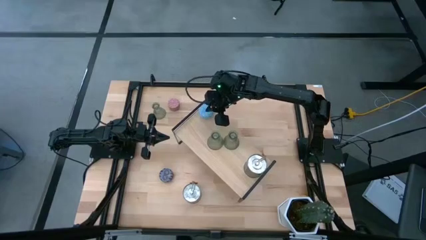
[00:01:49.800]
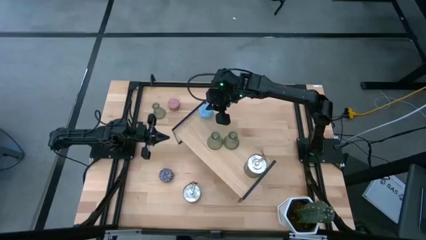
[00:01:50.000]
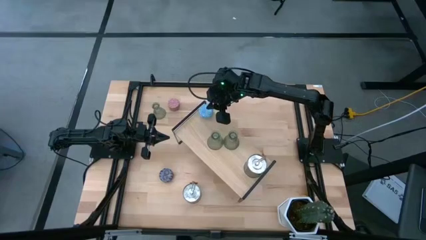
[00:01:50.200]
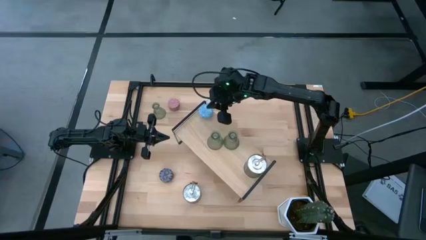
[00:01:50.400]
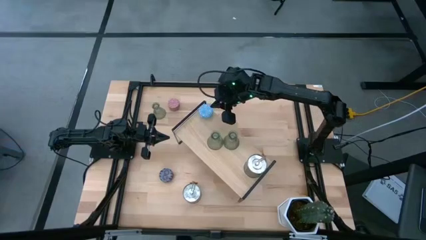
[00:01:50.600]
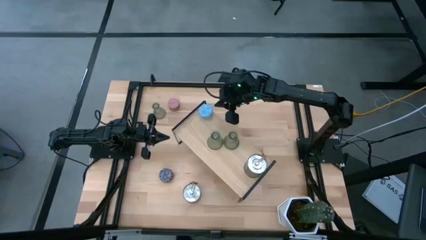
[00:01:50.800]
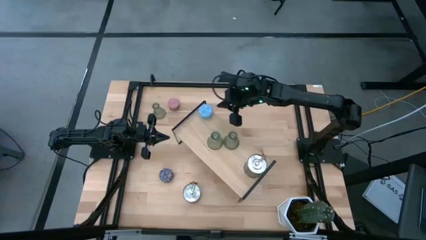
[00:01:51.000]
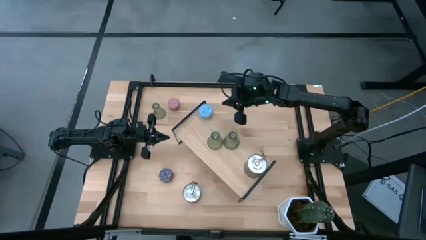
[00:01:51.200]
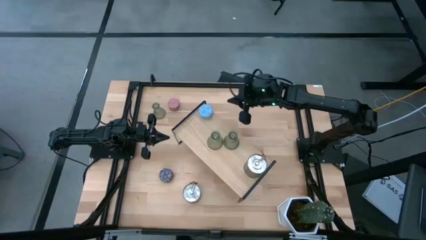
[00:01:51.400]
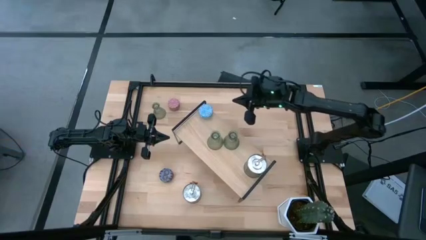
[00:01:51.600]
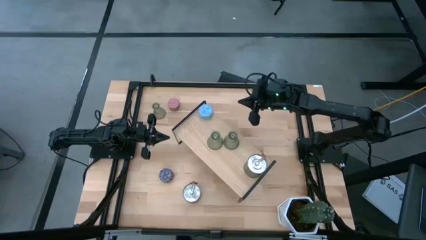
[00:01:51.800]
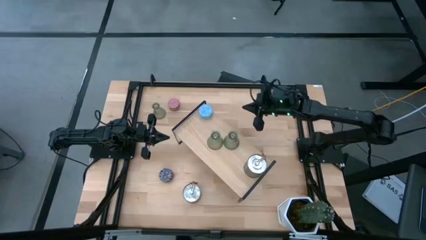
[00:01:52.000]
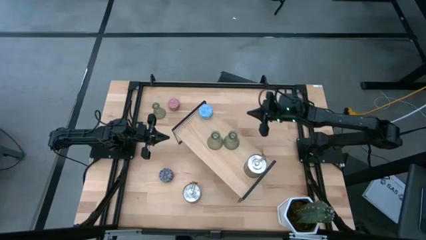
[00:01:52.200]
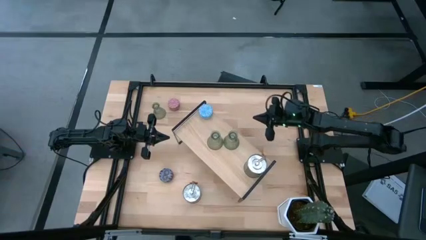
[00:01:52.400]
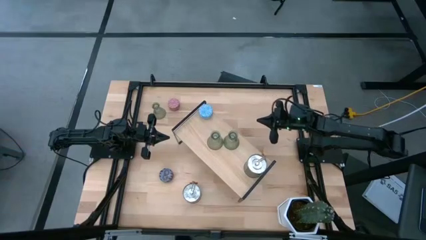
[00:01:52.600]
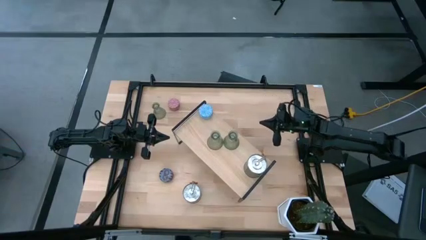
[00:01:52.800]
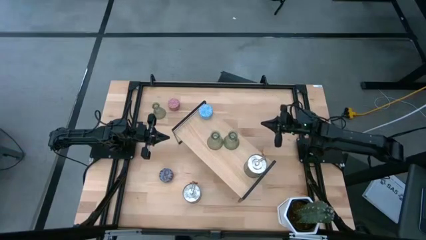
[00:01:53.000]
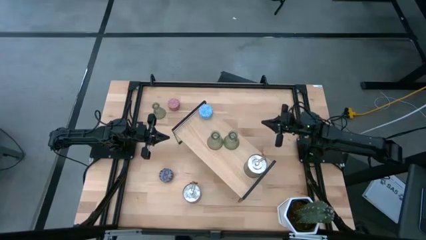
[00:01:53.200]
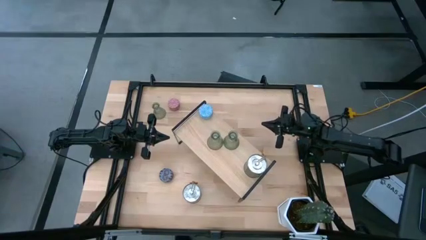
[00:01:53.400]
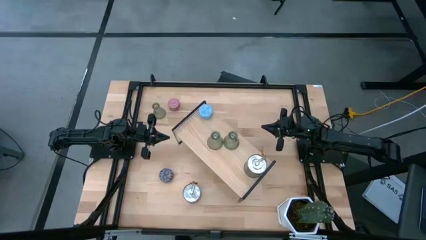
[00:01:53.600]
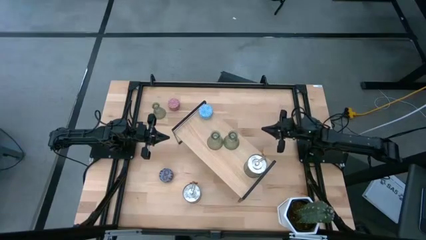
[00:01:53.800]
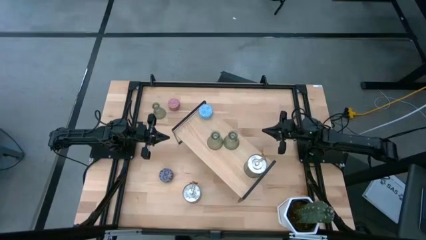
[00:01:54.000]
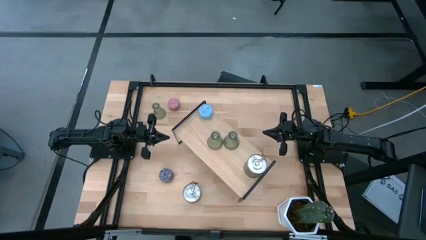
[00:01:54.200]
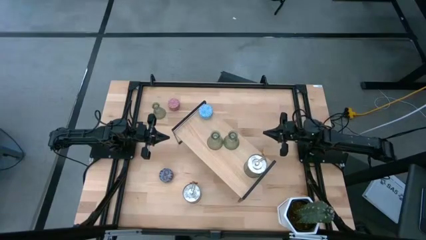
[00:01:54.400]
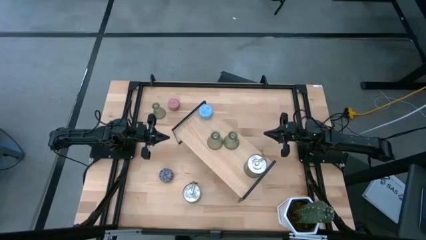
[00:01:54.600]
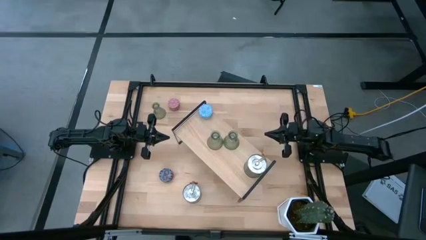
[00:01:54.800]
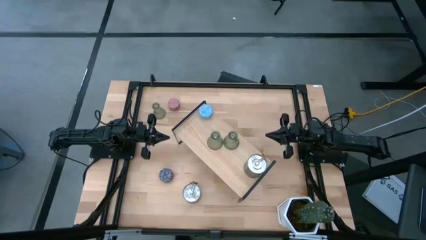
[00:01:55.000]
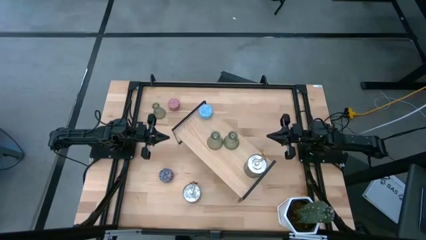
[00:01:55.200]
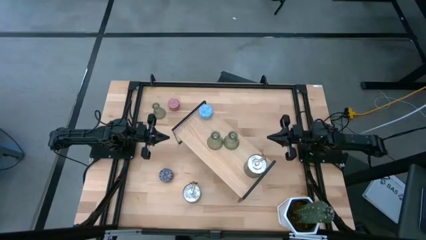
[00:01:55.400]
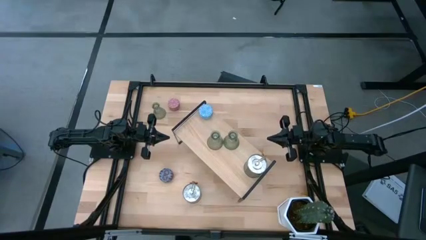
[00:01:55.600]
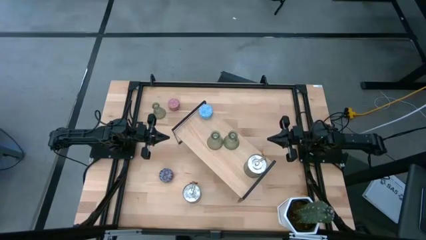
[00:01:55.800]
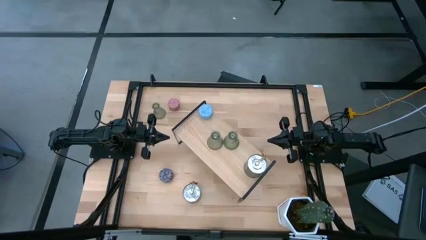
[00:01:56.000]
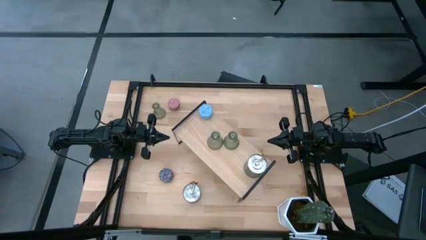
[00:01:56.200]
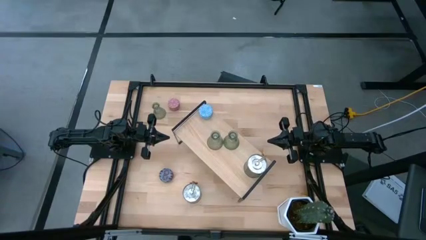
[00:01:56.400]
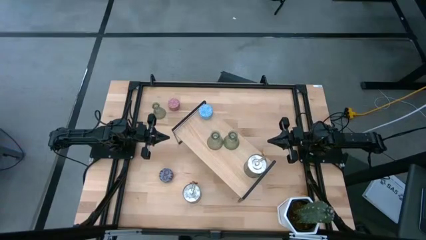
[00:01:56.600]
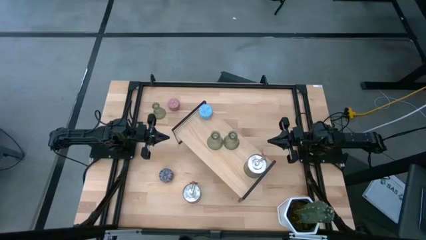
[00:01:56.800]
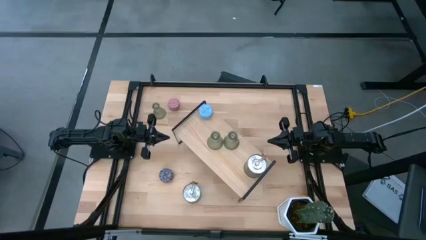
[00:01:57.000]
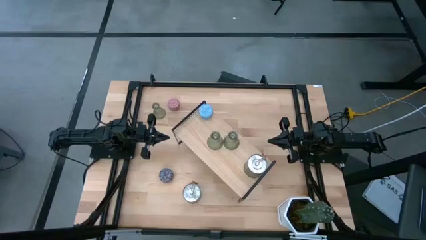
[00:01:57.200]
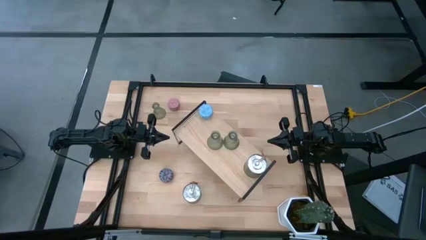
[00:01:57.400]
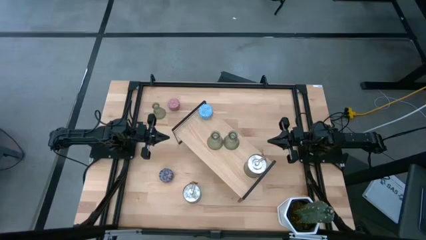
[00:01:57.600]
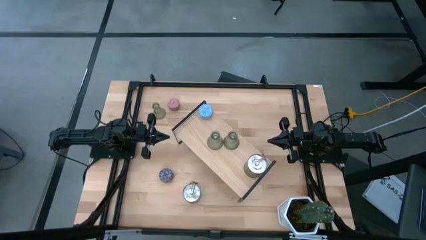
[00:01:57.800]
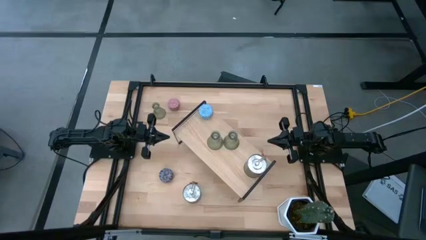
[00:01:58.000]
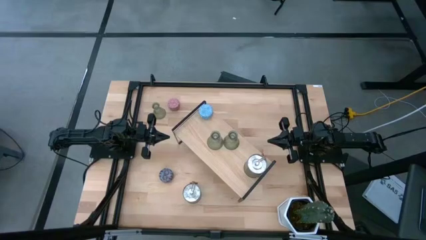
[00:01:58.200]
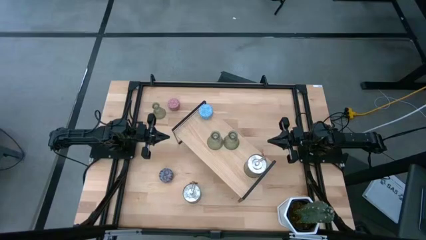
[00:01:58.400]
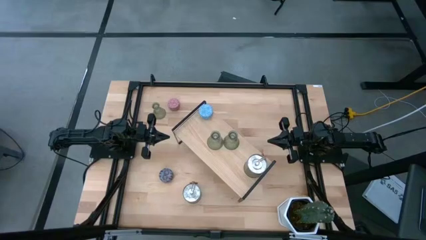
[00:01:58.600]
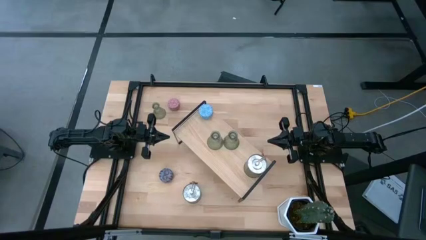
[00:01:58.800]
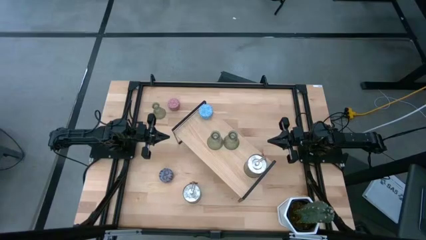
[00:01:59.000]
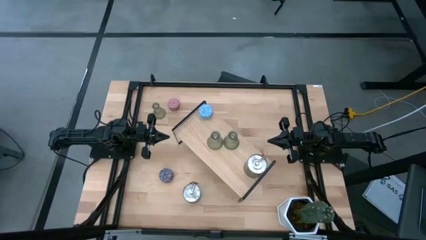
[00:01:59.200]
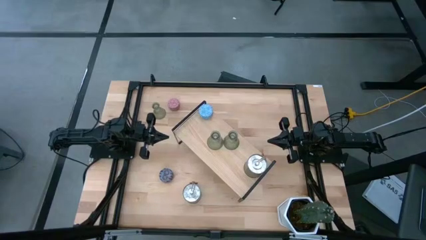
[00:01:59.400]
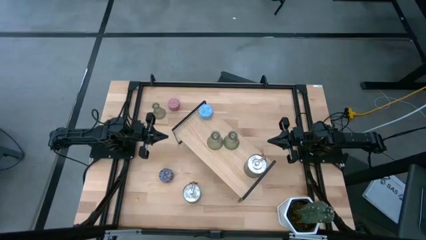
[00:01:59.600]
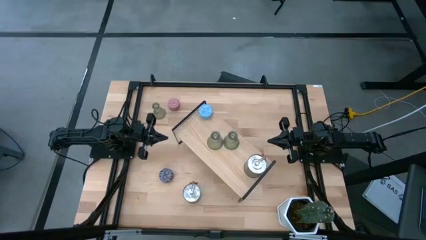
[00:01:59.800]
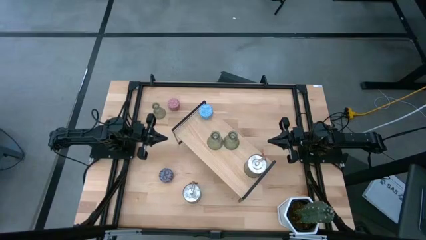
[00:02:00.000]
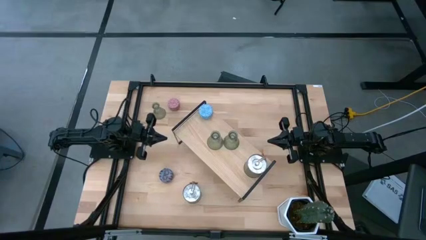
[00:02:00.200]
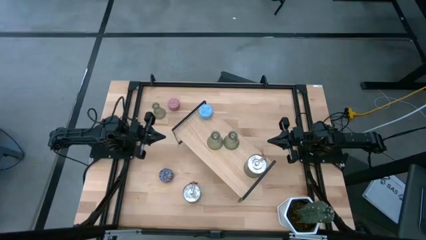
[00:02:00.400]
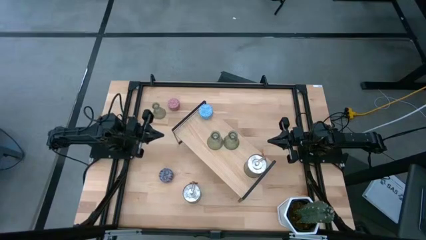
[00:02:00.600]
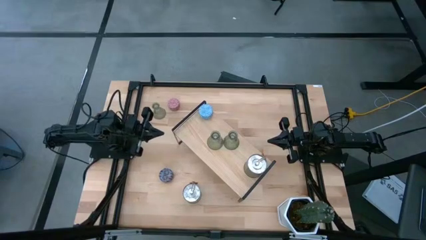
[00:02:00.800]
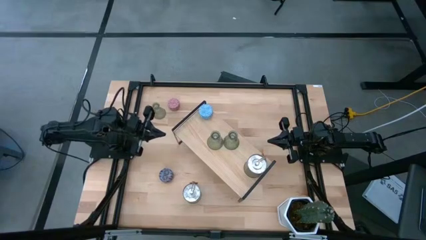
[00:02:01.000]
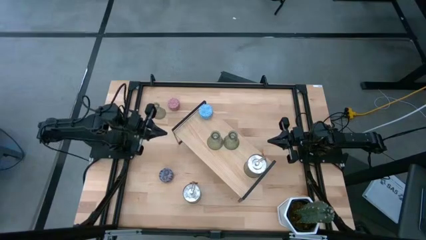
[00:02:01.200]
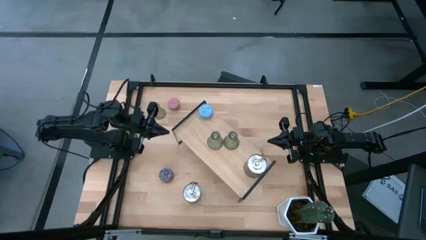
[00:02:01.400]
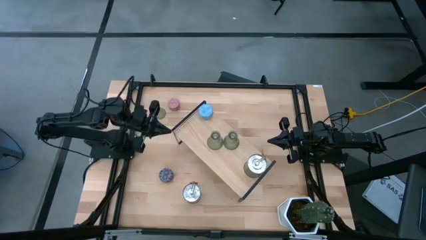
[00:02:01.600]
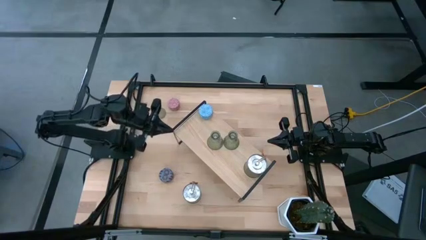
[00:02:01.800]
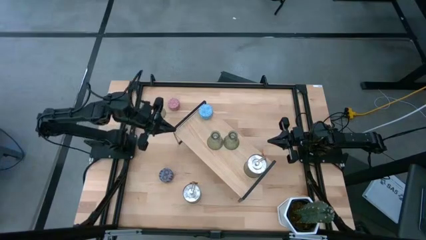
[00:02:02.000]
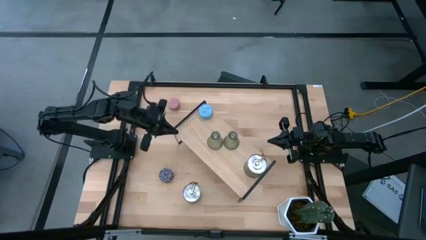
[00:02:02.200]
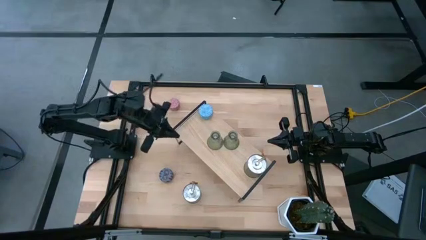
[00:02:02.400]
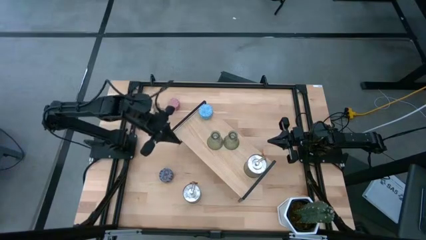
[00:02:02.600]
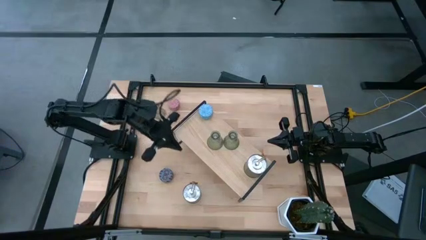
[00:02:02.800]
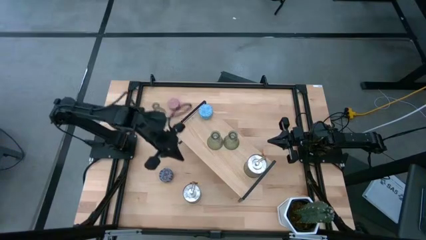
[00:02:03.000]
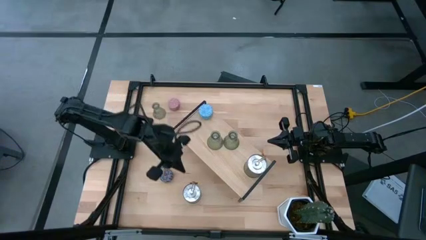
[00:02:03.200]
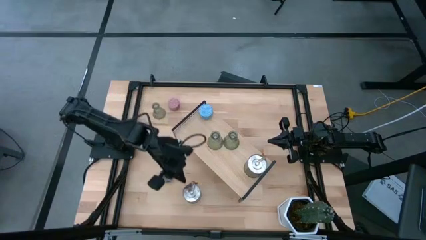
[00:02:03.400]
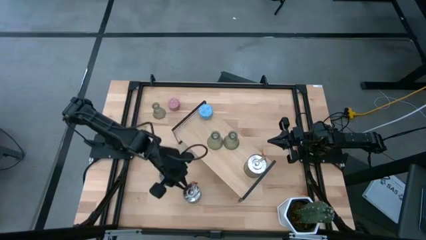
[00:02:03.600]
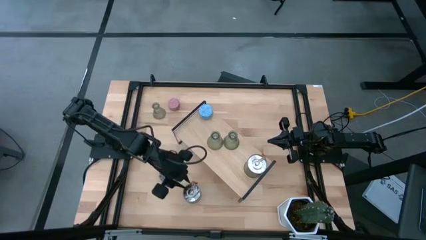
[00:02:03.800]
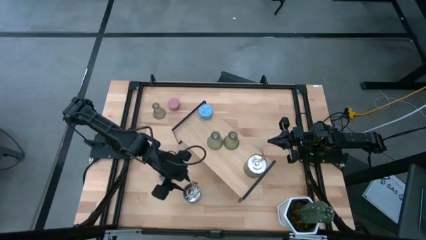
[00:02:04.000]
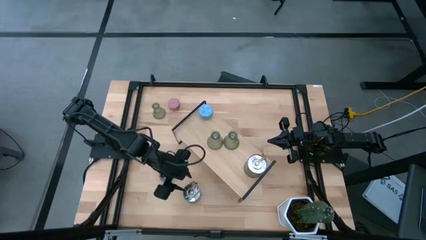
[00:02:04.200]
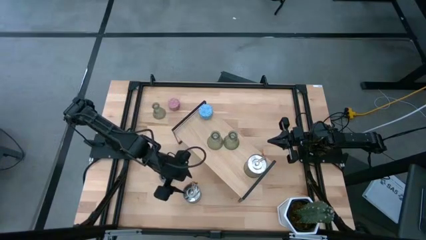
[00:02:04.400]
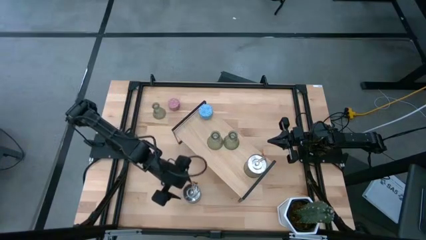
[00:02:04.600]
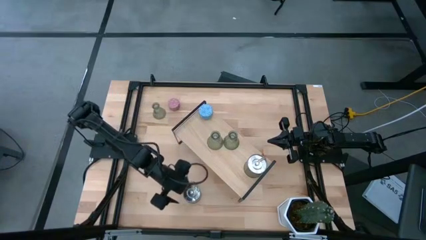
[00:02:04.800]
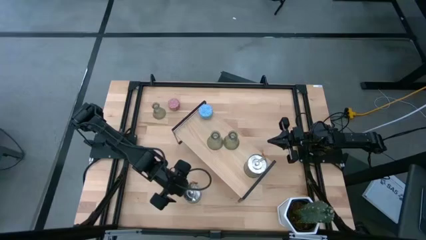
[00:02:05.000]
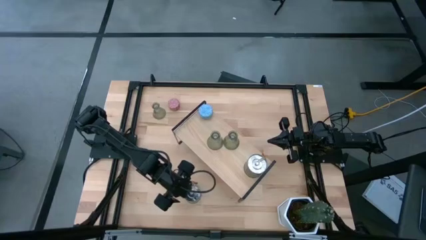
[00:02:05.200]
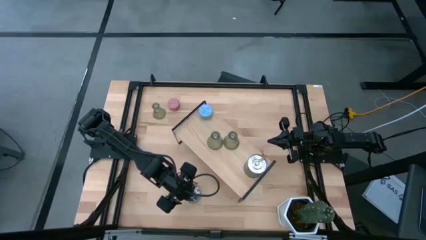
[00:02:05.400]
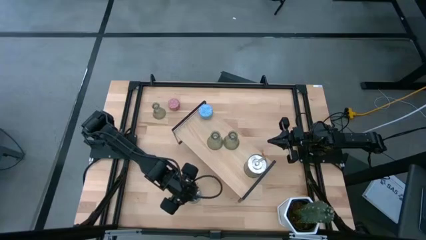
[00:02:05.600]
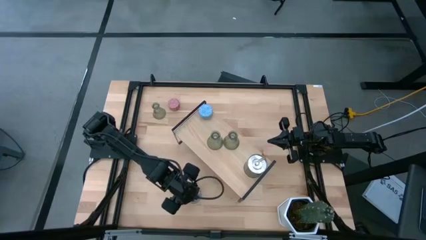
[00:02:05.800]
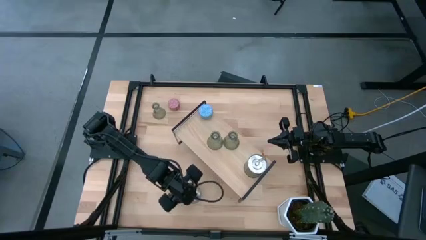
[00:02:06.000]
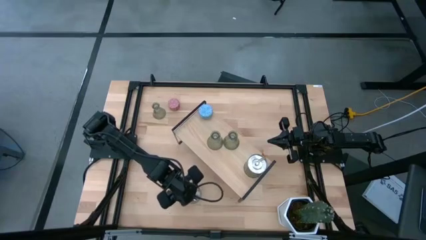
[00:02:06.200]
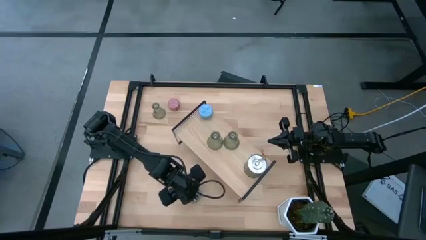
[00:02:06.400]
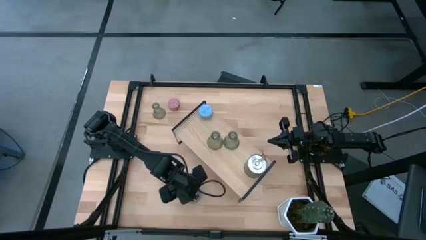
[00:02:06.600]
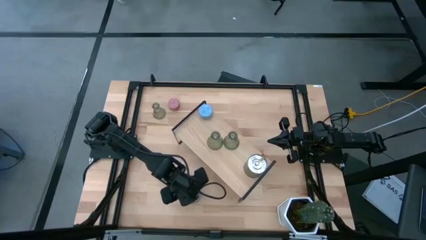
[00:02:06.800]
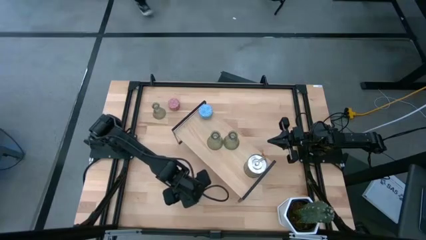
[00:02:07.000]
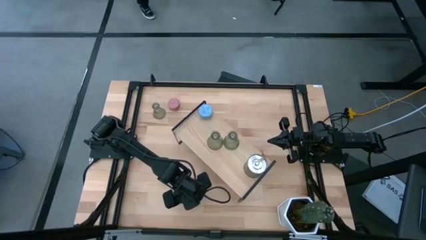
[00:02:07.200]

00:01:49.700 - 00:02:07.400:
Task: Pick & Place candle stick holders
Put the silver scented candle can on the shelf
